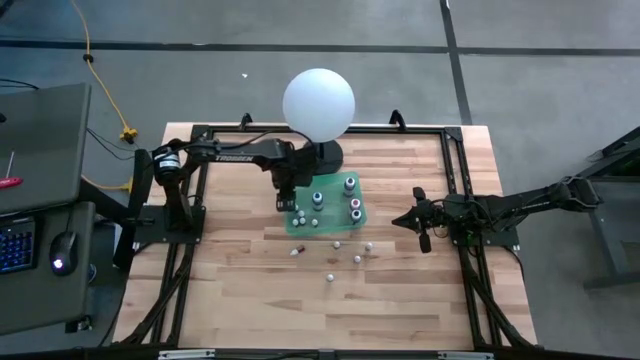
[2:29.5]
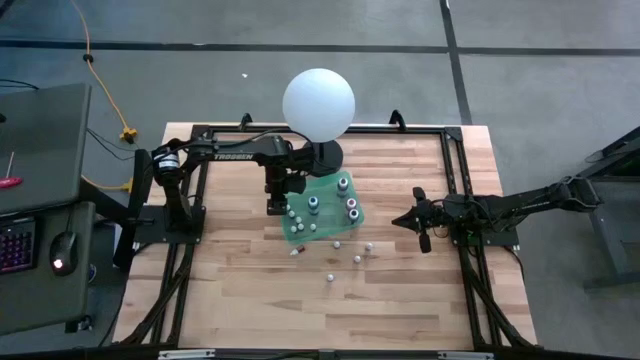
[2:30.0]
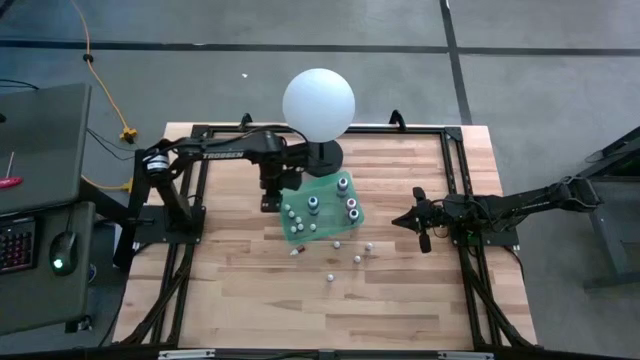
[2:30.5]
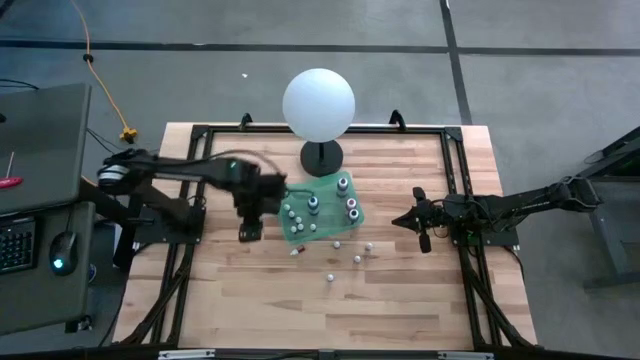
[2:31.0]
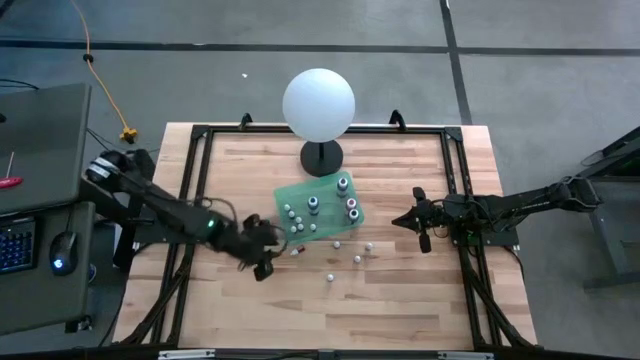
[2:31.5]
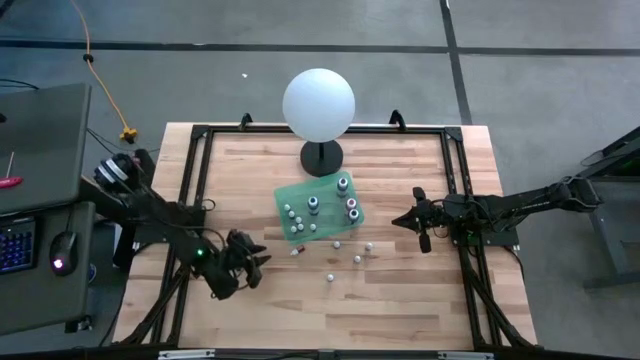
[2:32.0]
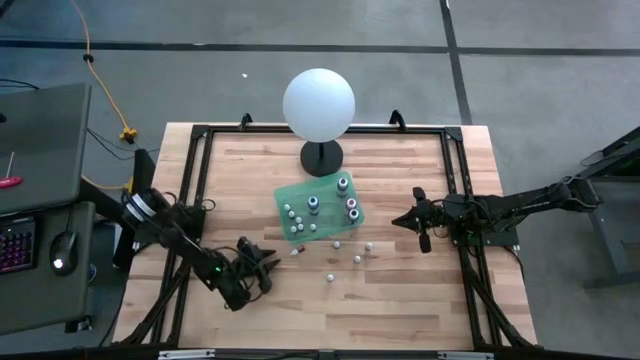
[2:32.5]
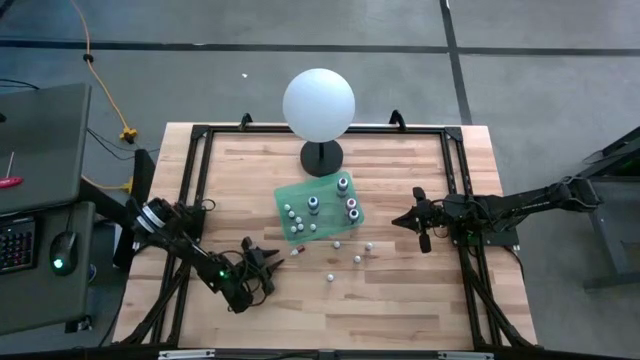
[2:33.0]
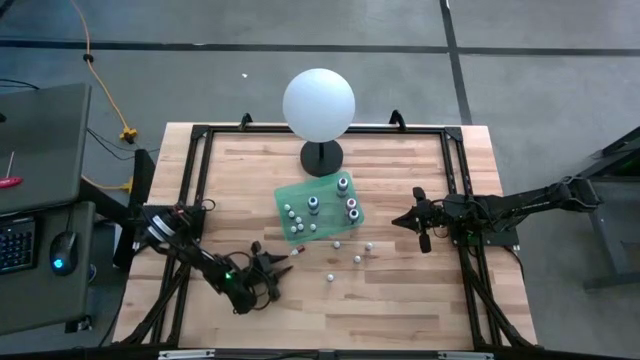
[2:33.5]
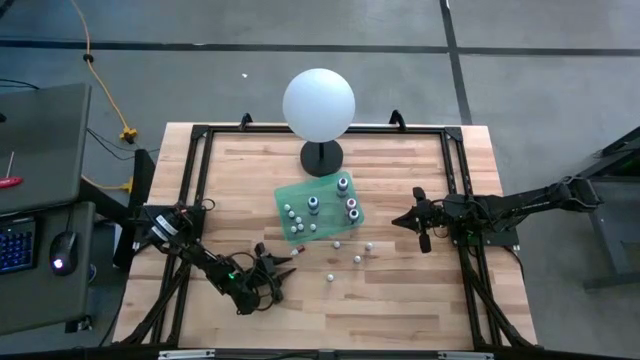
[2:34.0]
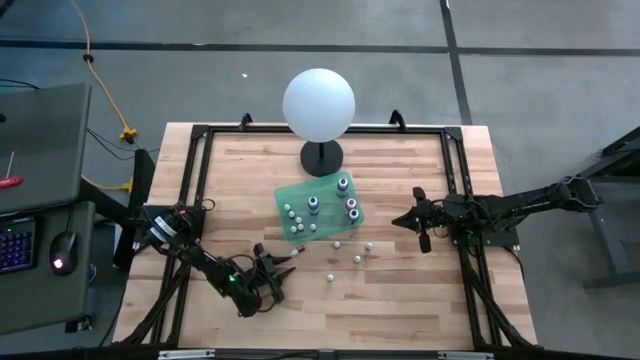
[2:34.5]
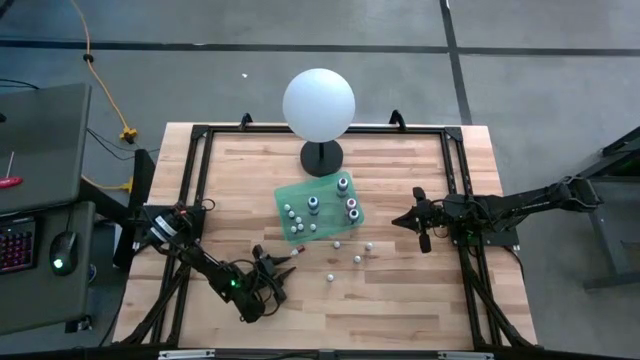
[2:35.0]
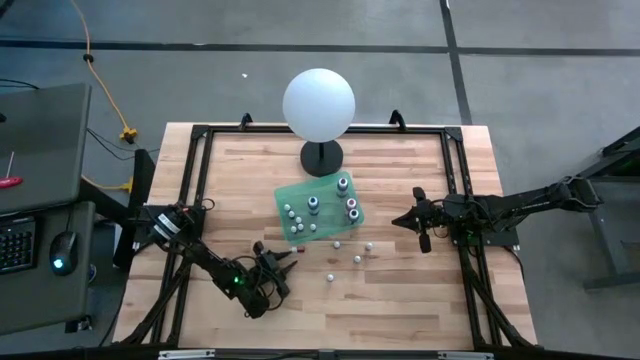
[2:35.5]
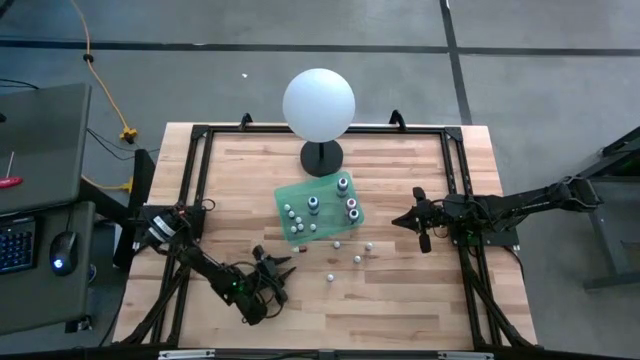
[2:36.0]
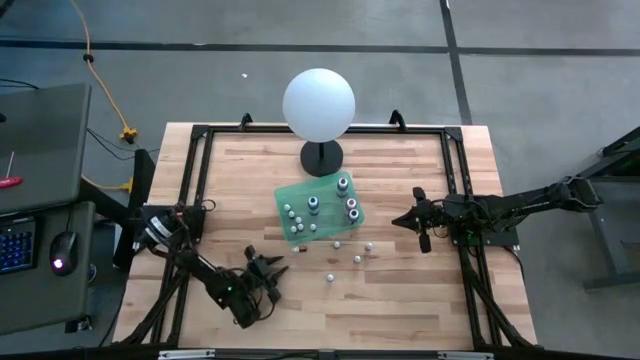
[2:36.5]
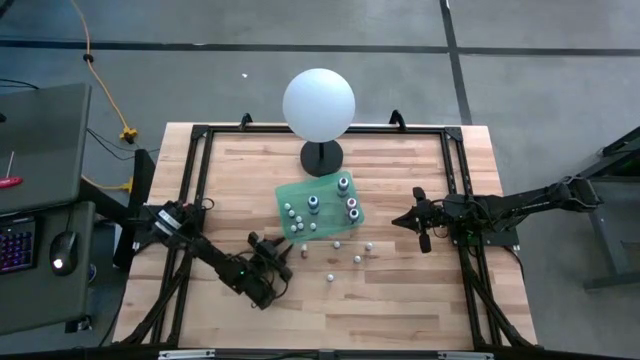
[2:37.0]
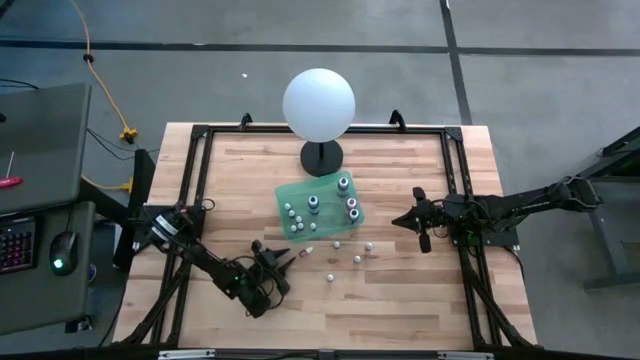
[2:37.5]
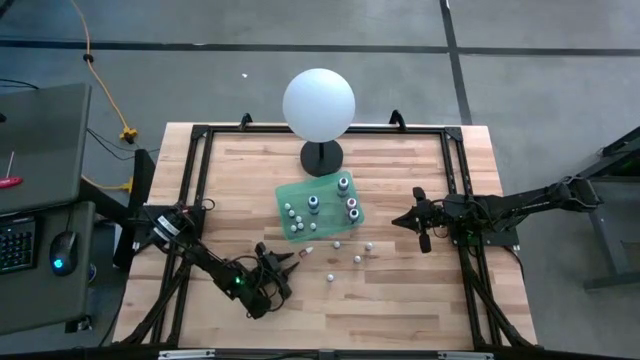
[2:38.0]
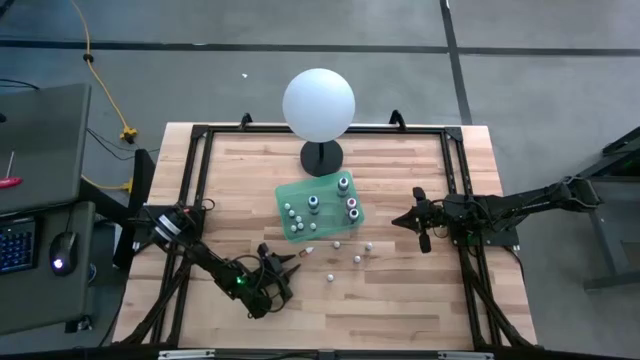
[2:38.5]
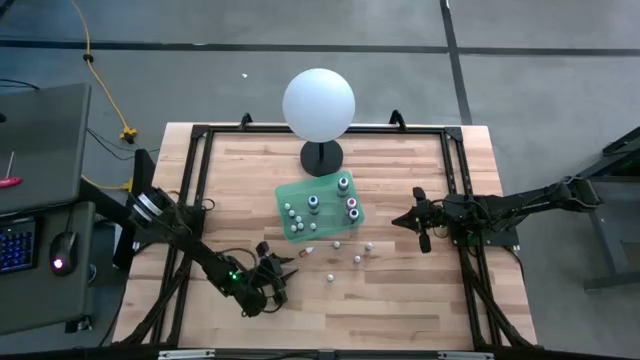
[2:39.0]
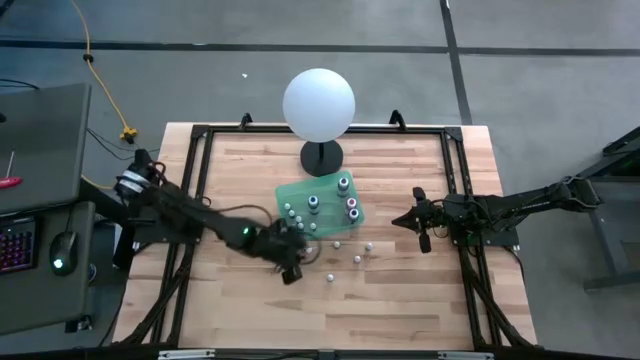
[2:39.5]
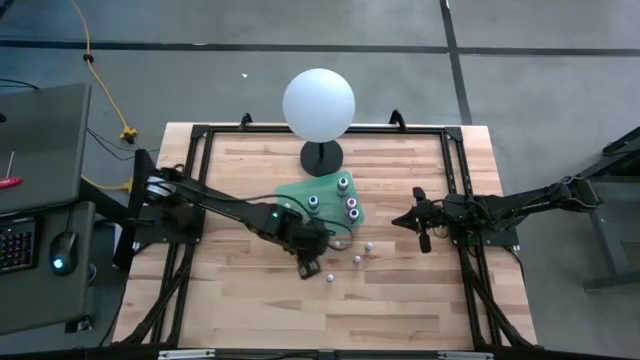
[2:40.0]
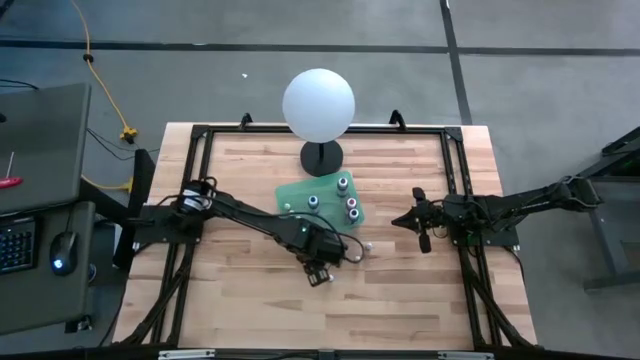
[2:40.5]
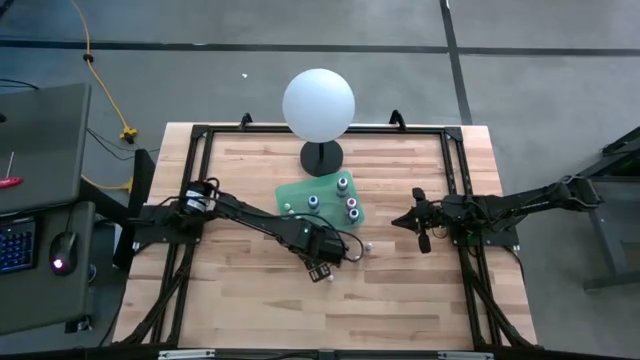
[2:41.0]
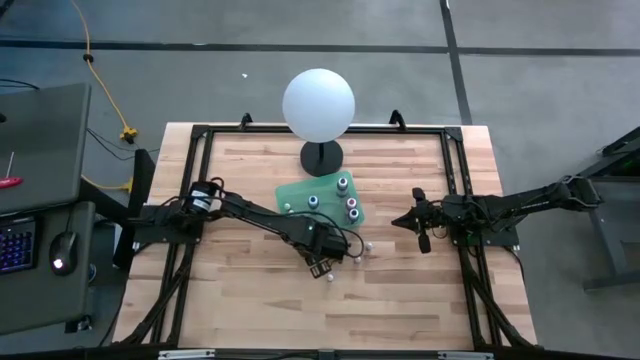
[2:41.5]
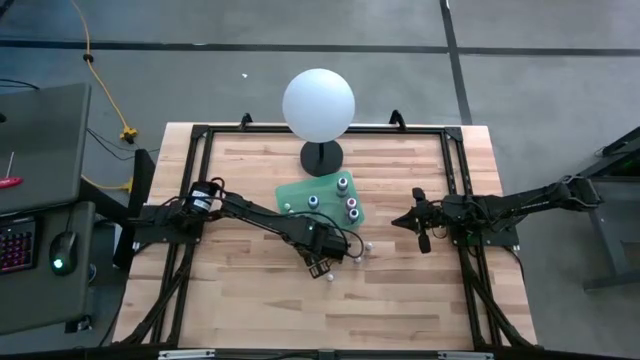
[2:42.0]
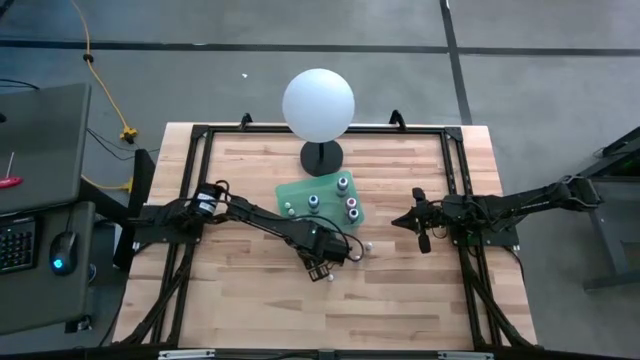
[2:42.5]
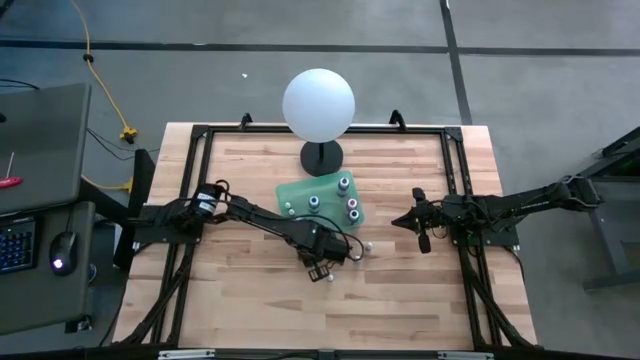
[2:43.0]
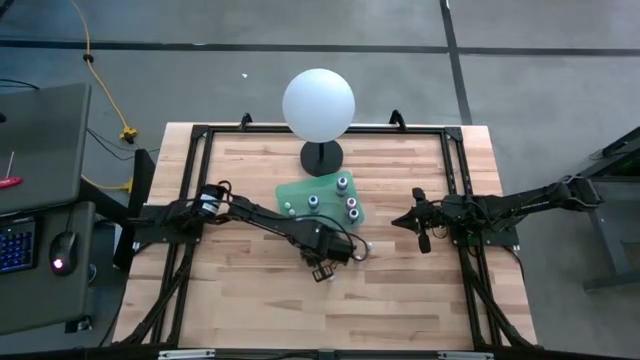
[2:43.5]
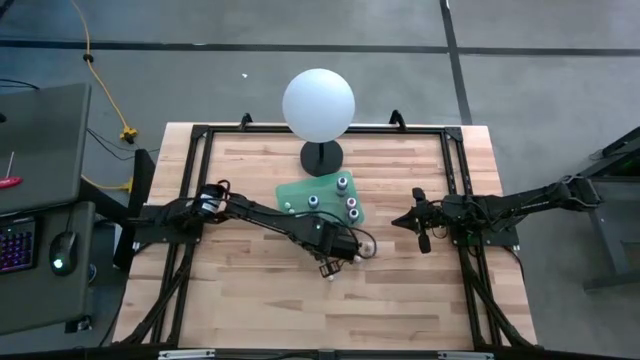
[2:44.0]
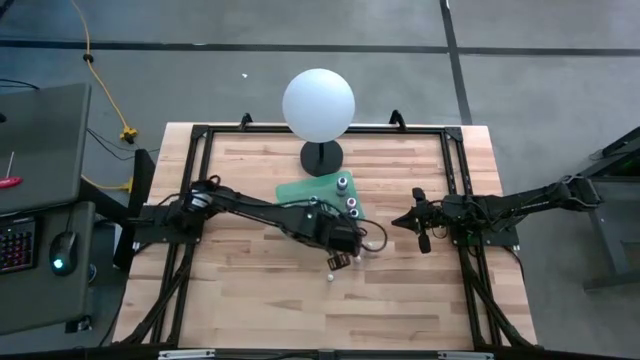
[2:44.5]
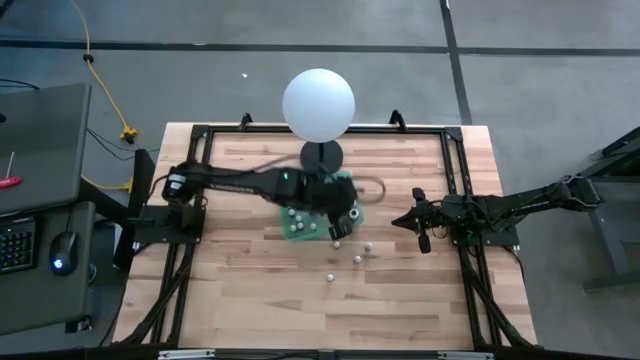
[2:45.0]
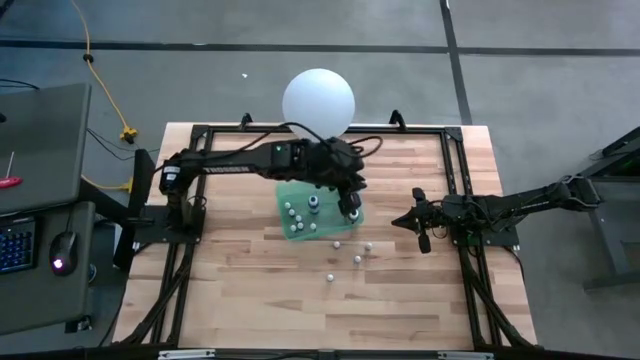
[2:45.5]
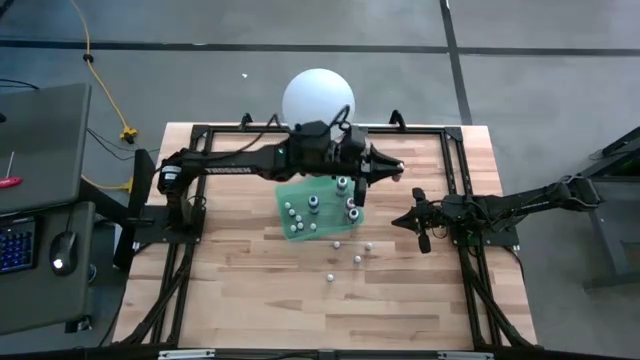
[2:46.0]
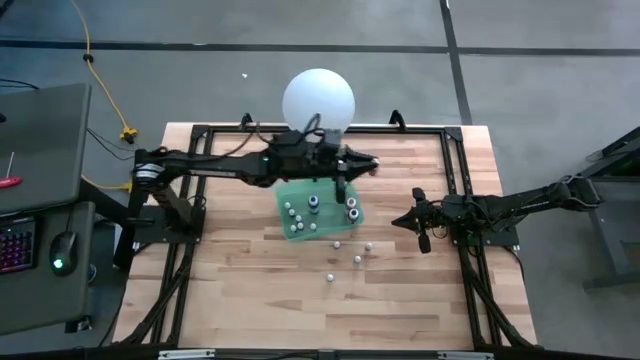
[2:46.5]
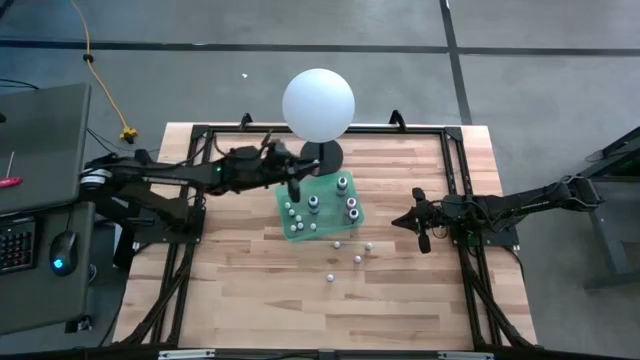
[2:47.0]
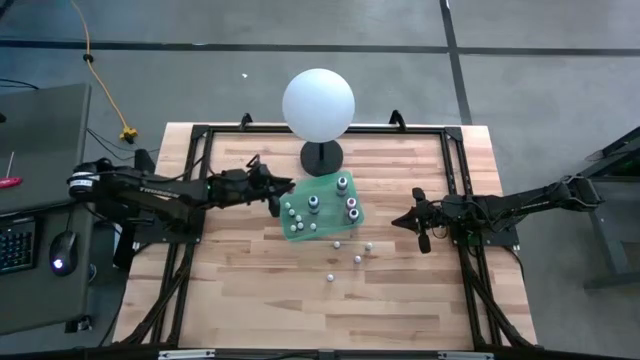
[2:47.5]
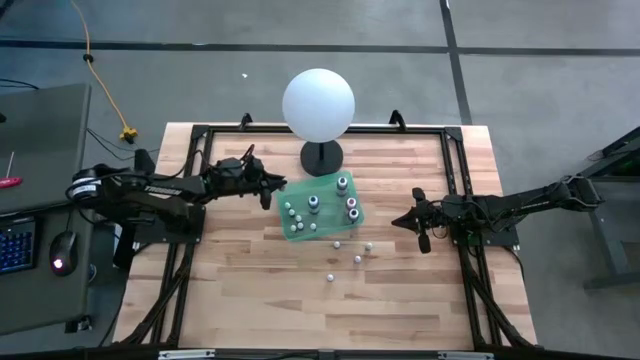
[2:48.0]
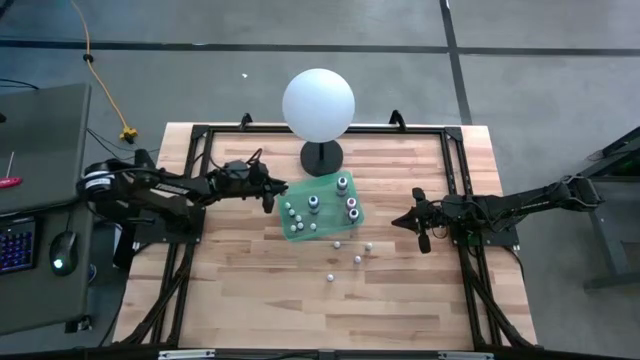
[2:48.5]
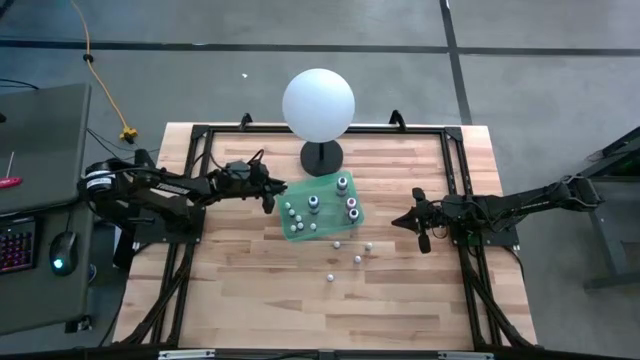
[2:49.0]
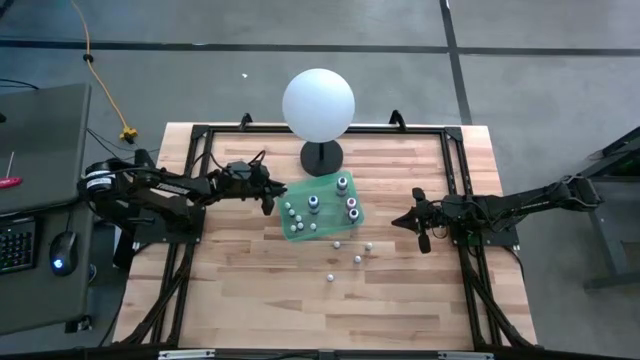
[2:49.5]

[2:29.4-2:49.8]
Task: Pick & Place food coloring
Put the small orange food coloring bottle into the bin
